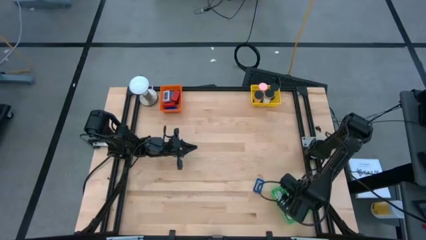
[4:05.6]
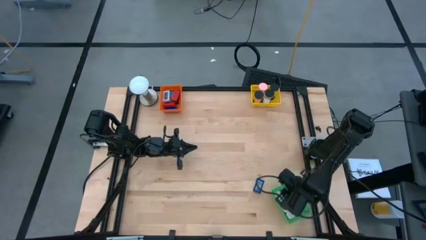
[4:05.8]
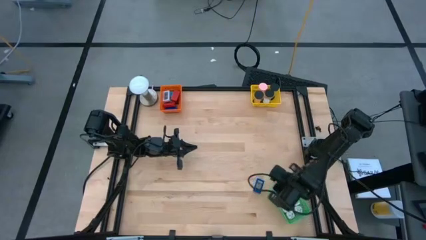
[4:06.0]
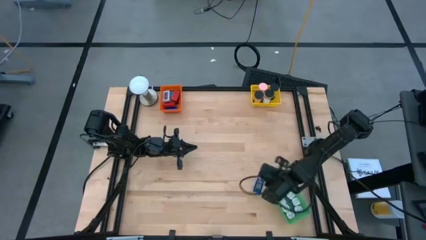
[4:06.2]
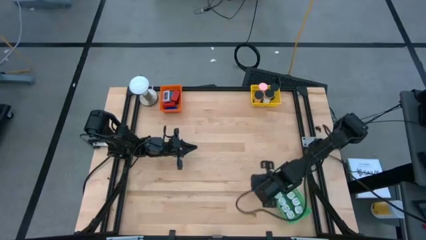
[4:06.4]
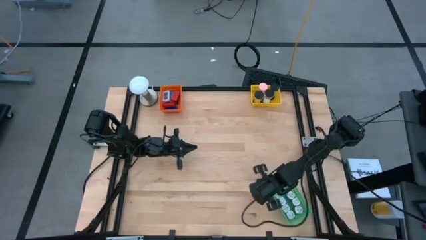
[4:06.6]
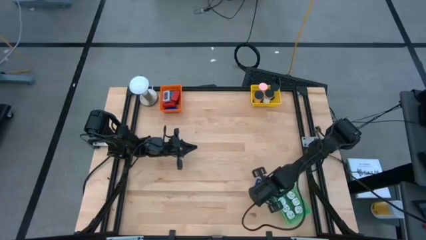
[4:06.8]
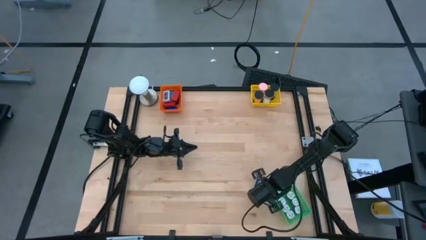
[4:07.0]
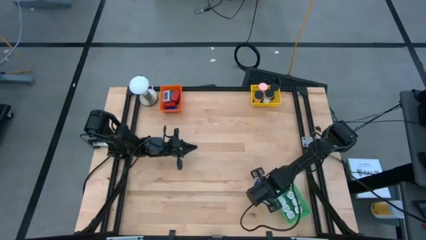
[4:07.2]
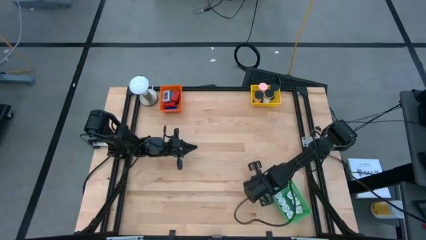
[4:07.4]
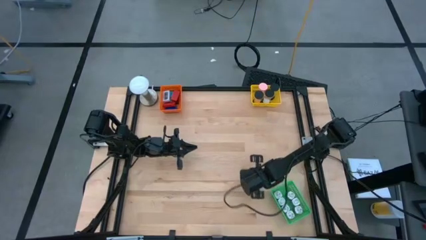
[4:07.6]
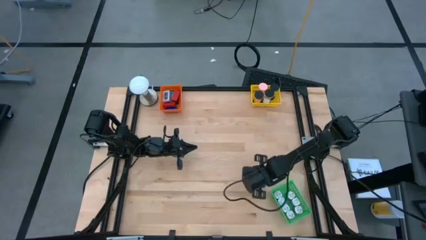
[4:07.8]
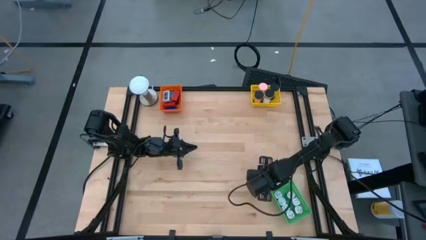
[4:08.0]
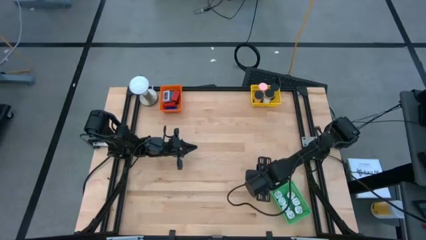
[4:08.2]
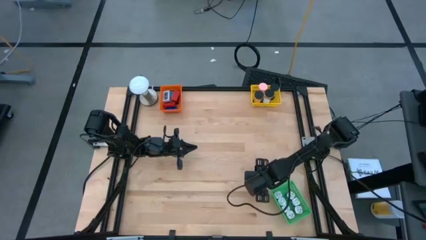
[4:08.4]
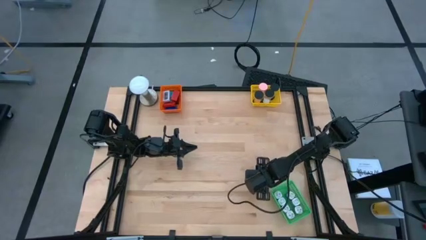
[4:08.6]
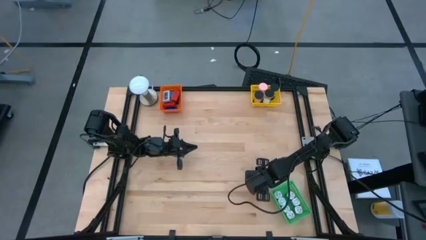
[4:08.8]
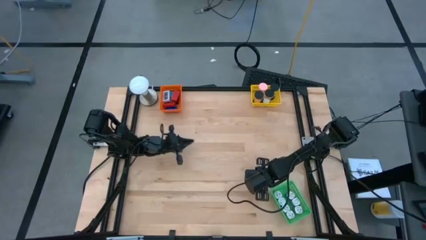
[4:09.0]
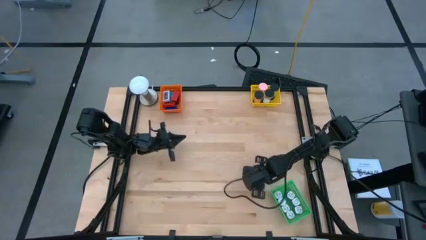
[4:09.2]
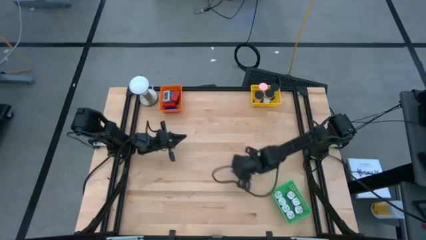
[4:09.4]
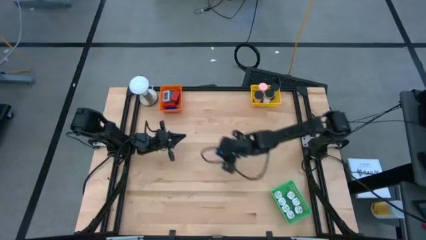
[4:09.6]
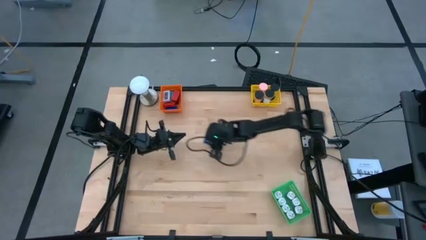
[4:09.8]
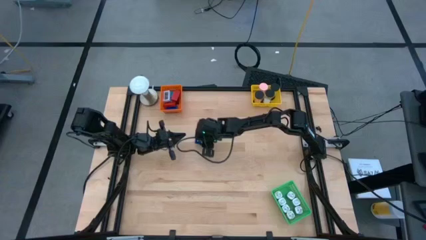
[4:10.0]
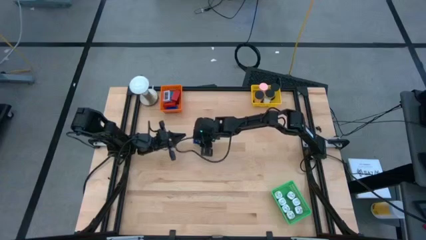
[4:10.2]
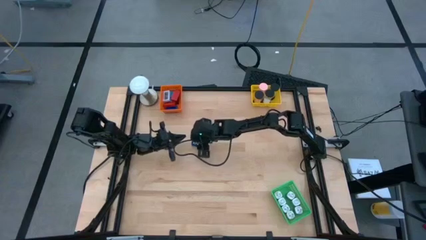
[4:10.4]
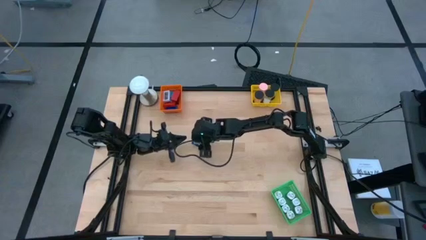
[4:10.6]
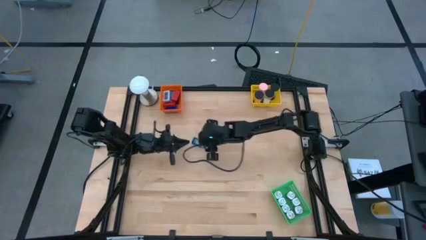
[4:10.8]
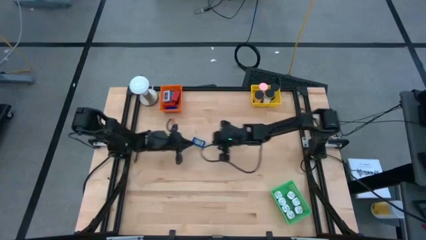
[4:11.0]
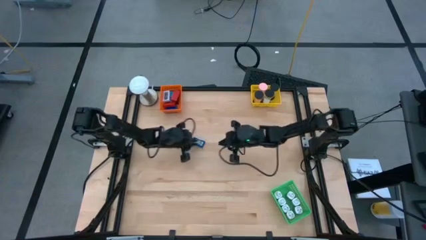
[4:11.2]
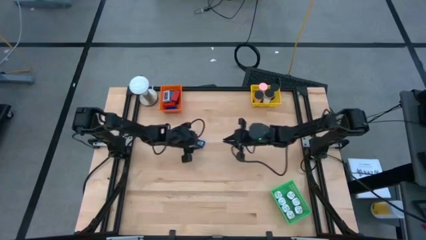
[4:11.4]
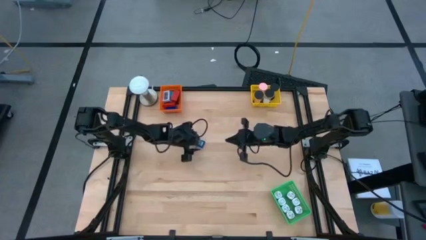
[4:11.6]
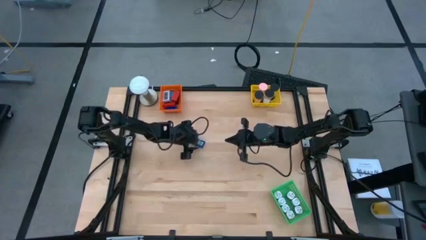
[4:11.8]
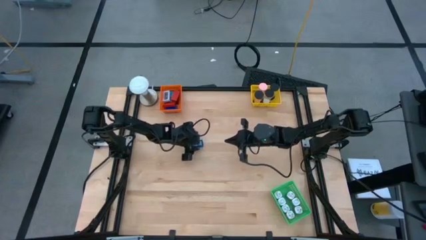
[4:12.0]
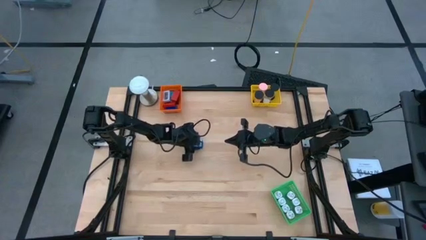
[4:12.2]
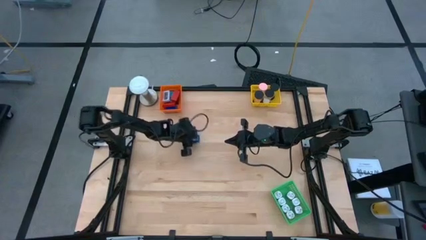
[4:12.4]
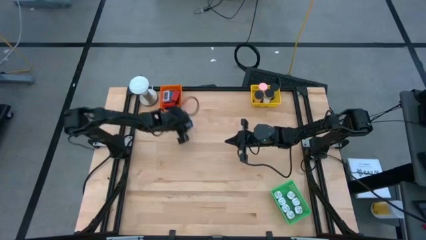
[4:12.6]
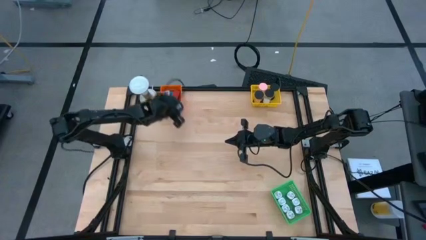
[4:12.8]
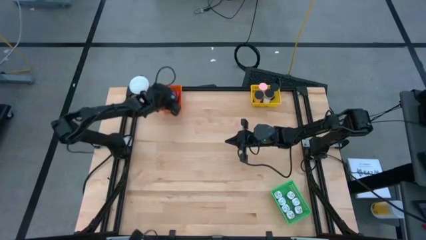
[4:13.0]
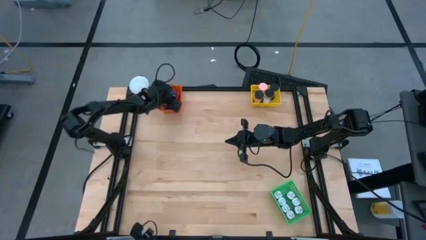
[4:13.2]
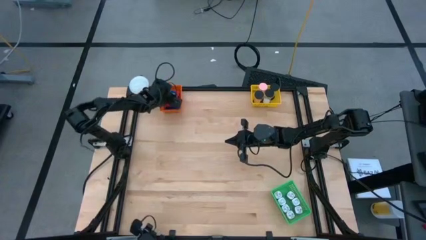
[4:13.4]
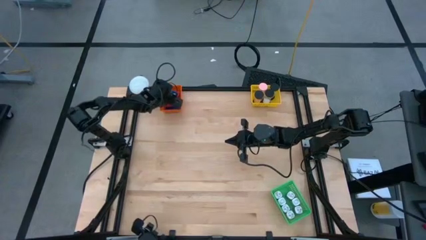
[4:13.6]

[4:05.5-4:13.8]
Task: Pick & Place Office items
Put the blue digital clock into the orange bin

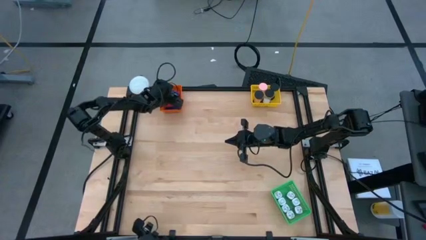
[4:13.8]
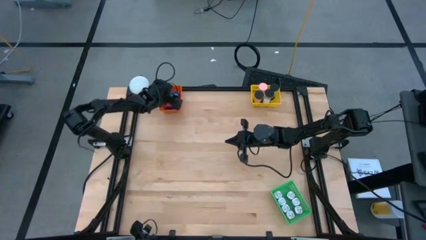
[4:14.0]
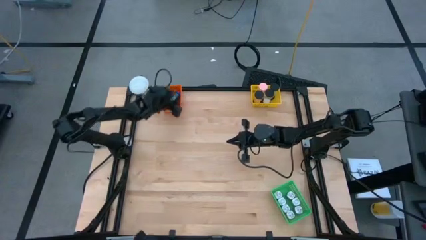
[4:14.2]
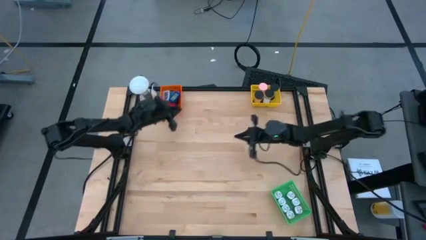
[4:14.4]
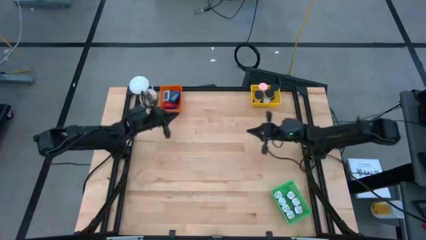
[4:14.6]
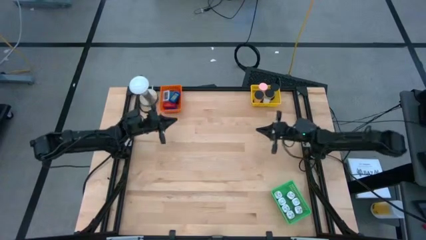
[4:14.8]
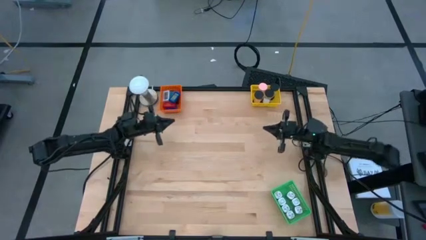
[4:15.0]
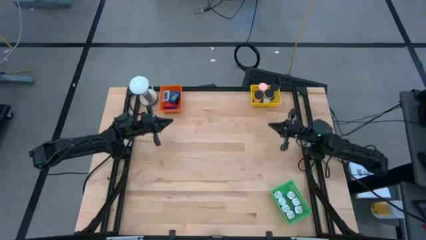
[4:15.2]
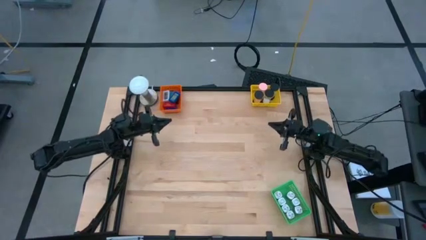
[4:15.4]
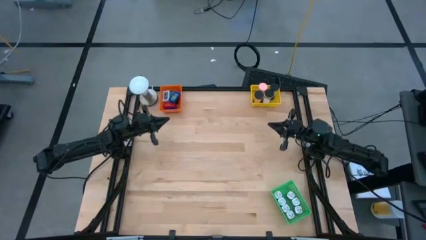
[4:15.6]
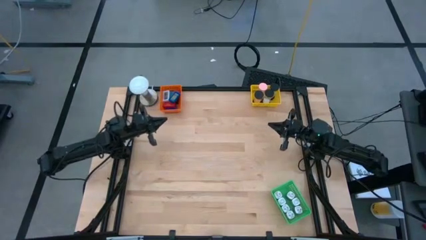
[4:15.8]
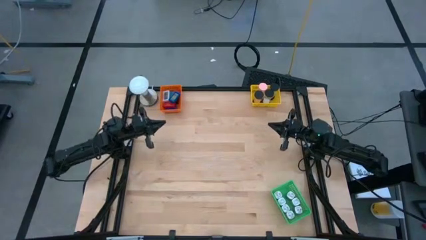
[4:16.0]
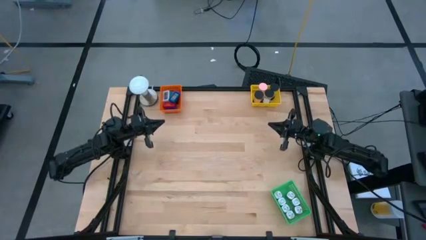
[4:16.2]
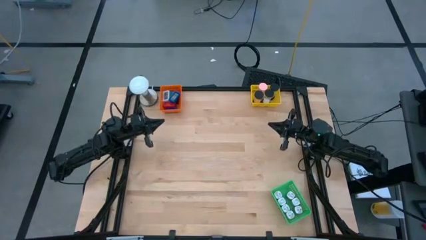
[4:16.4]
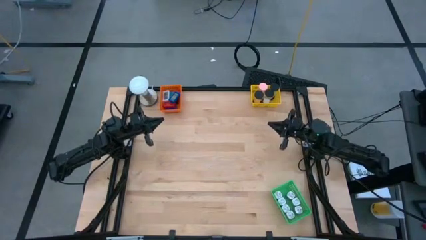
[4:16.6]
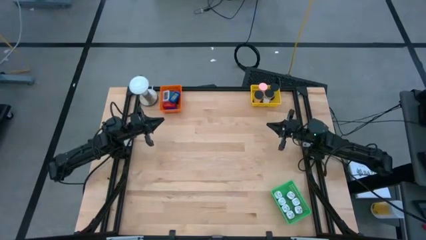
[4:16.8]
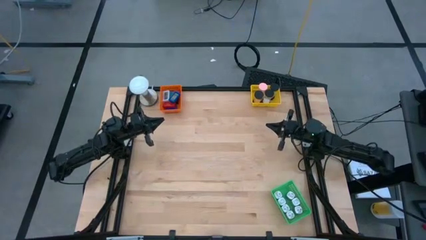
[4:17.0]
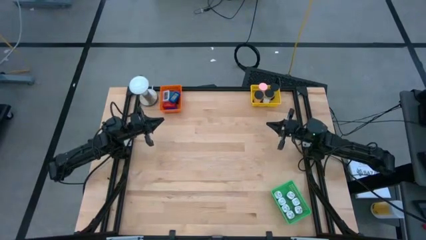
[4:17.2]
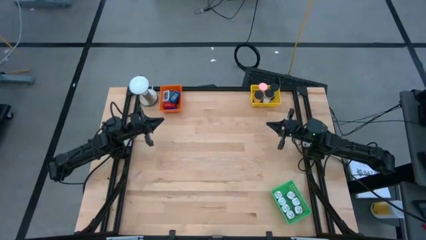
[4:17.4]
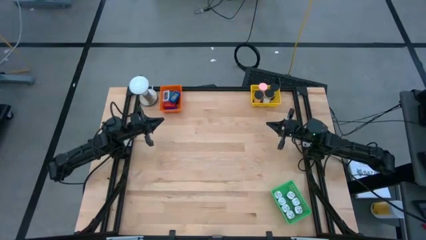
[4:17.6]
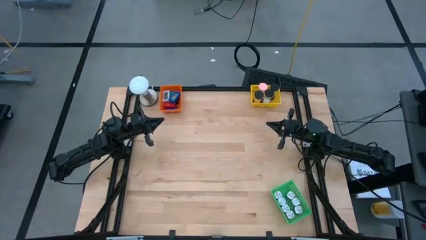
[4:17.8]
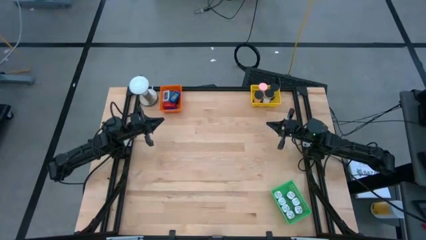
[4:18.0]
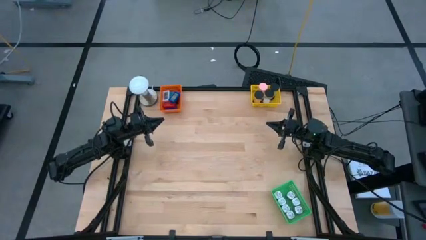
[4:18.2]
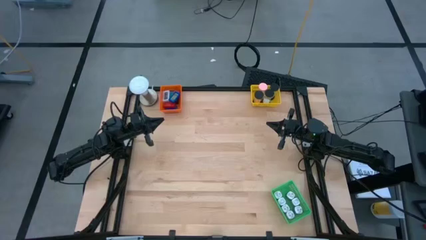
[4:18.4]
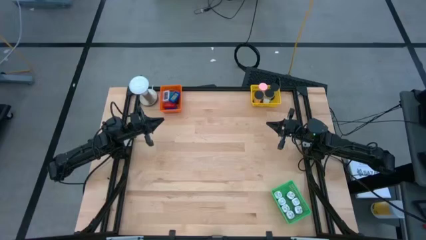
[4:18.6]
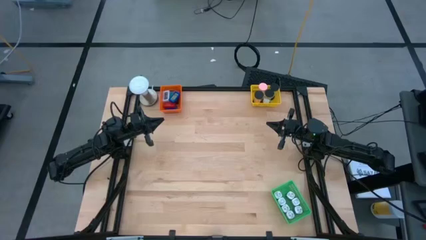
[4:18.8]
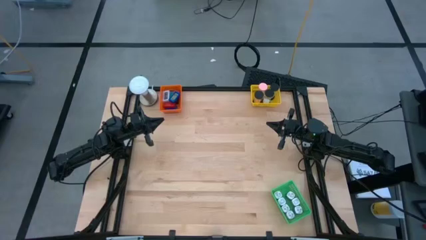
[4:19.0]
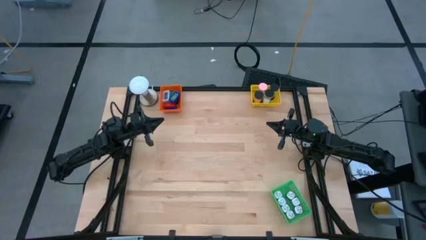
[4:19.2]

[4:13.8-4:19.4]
Return to Home Position

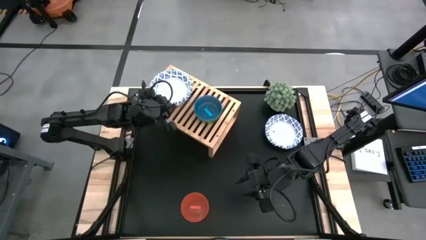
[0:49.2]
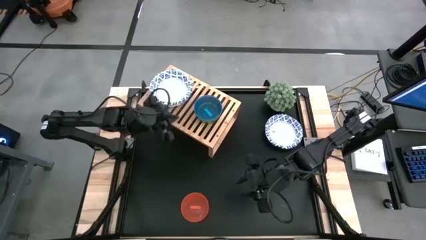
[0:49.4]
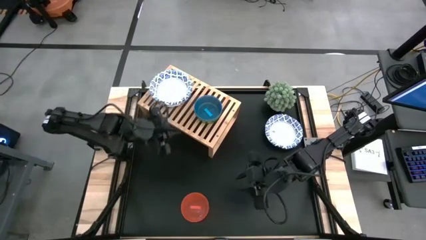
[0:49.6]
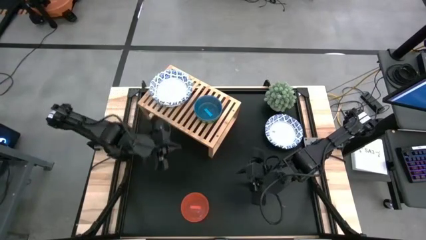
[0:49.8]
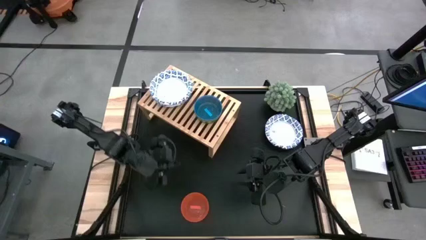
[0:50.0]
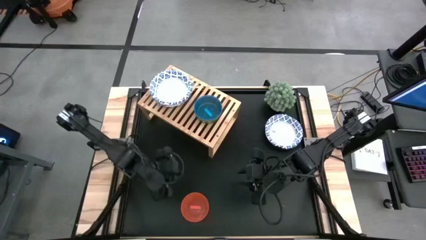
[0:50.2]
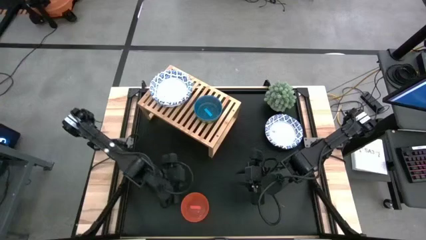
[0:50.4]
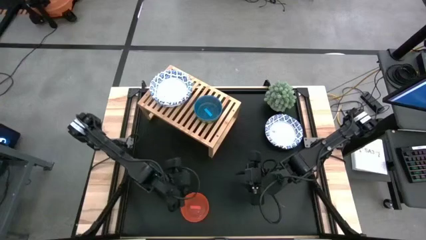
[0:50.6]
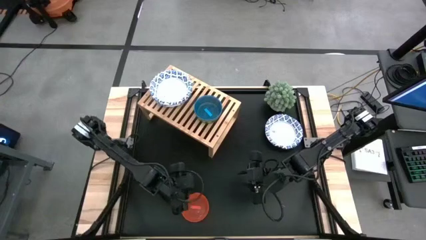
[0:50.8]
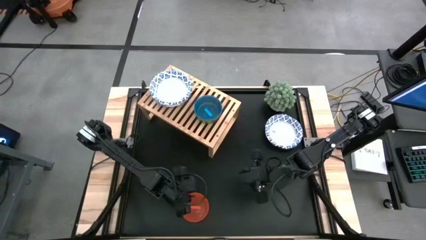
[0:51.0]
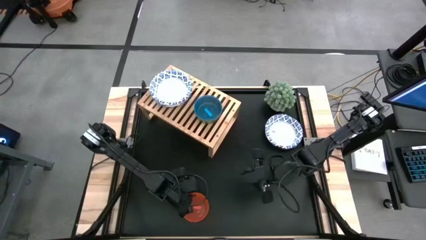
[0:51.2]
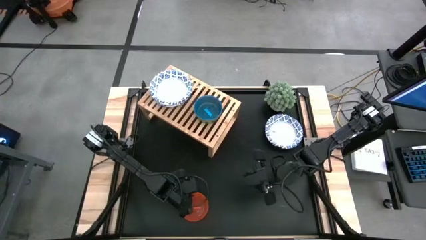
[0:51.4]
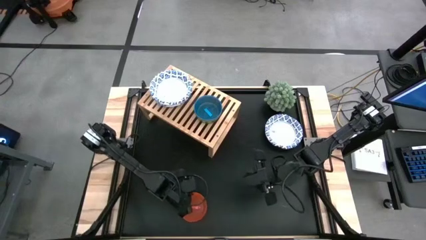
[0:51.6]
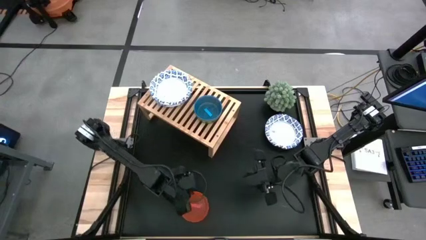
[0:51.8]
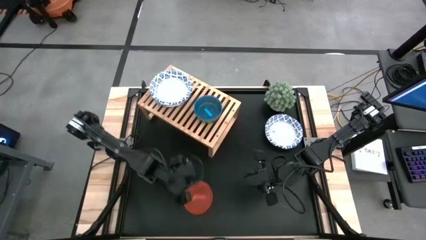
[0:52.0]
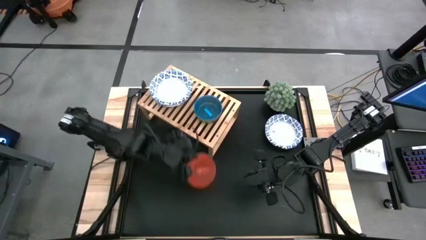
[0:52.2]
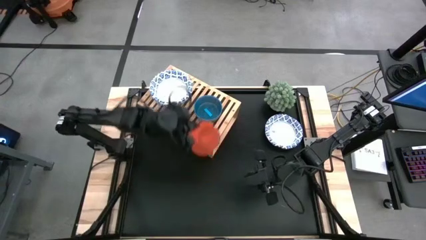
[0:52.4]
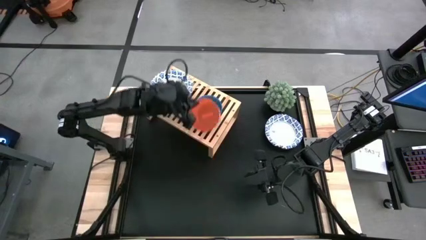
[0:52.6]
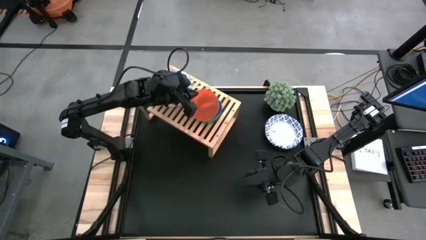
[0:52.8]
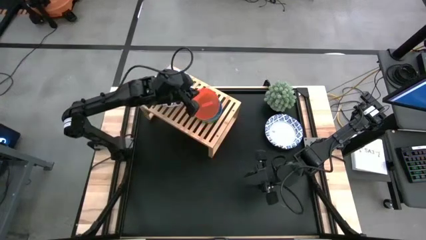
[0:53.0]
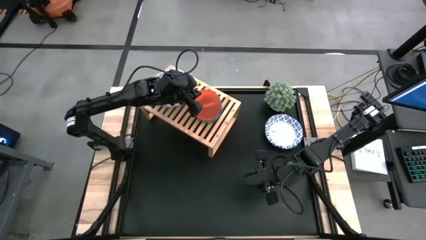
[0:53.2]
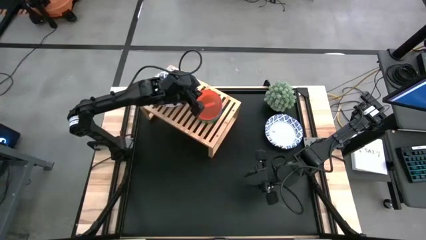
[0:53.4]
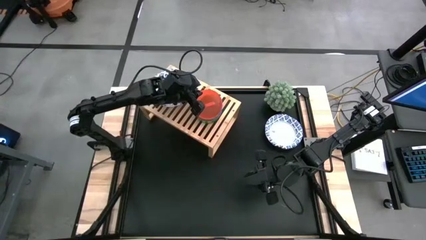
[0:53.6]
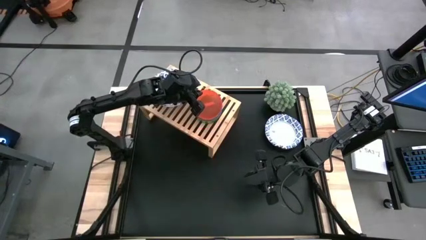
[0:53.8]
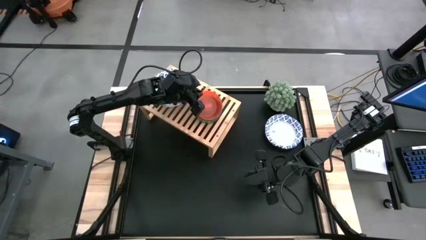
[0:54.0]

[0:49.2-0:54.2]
Task: Place and stack bowls onto a shelf
Stack the orange bowl into the blue bowl
